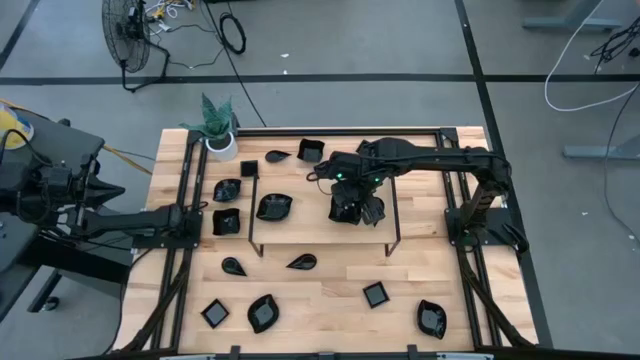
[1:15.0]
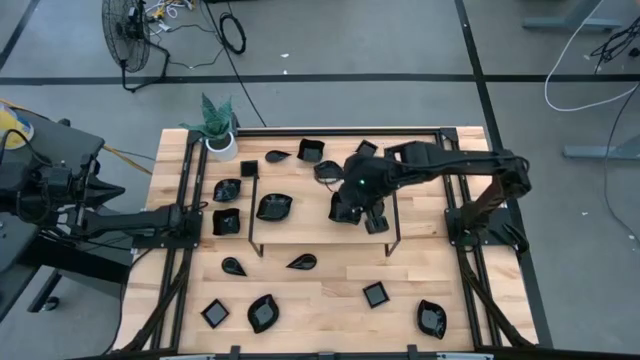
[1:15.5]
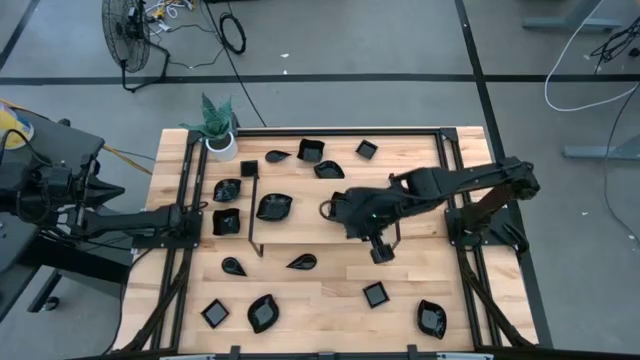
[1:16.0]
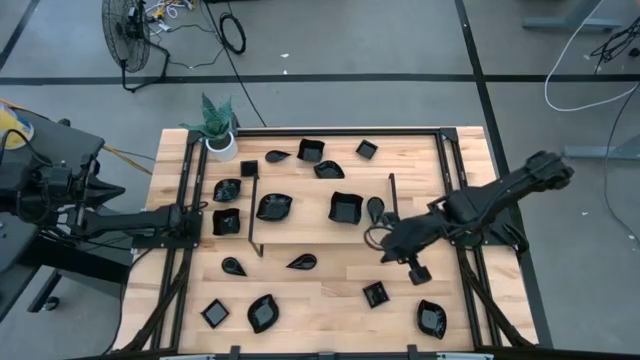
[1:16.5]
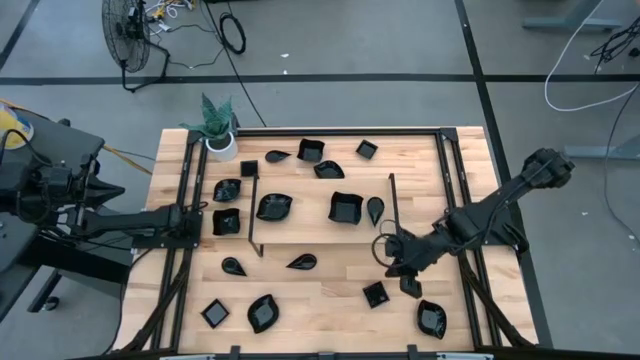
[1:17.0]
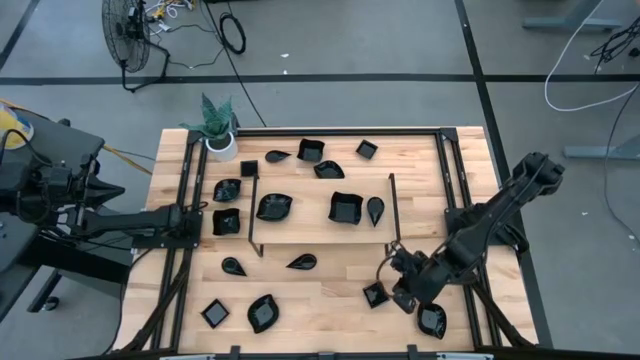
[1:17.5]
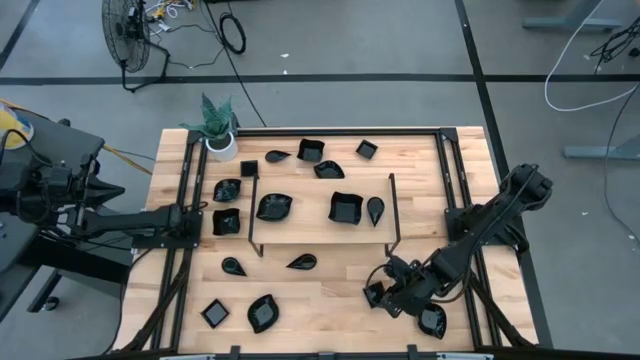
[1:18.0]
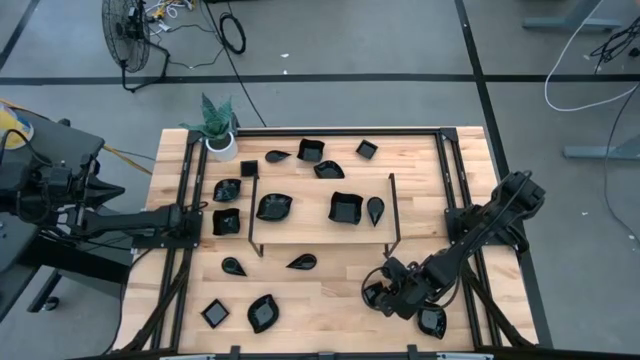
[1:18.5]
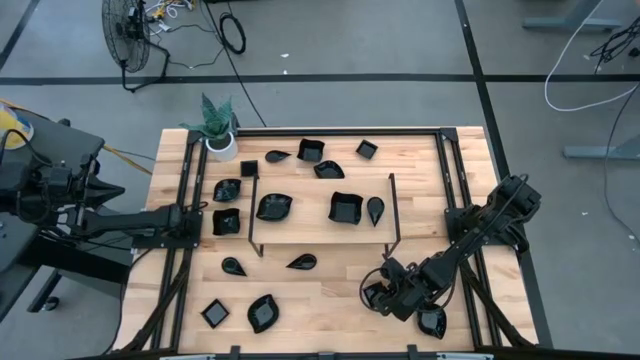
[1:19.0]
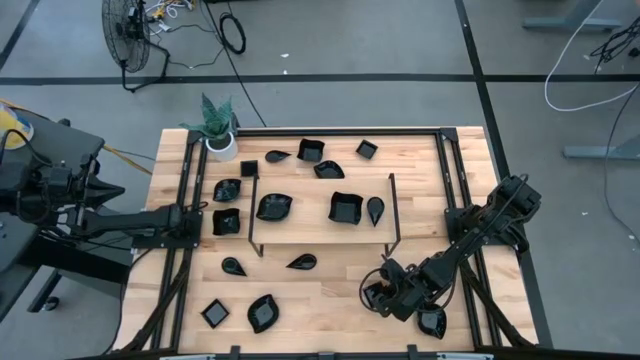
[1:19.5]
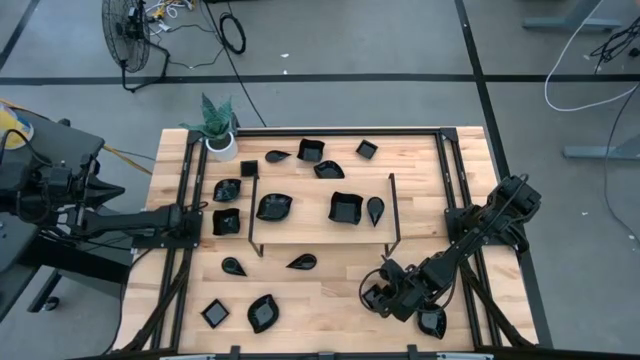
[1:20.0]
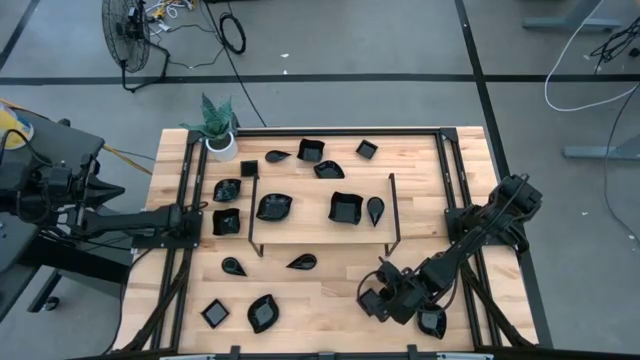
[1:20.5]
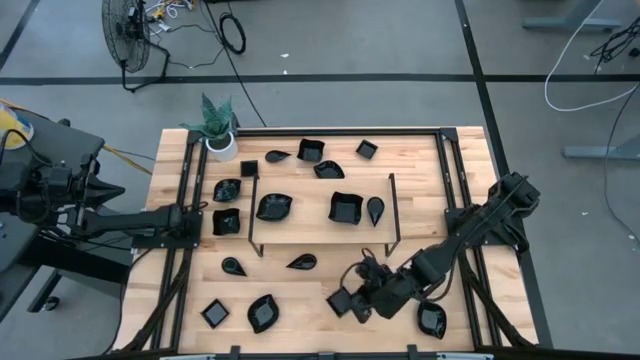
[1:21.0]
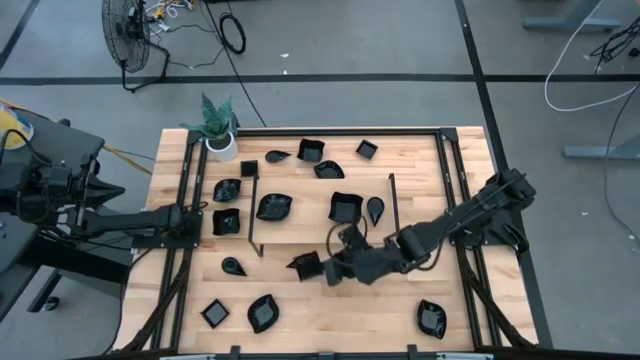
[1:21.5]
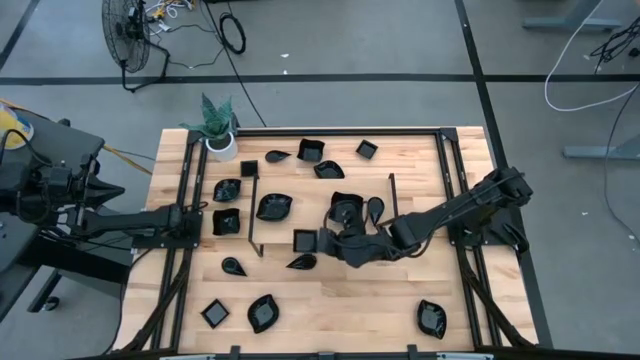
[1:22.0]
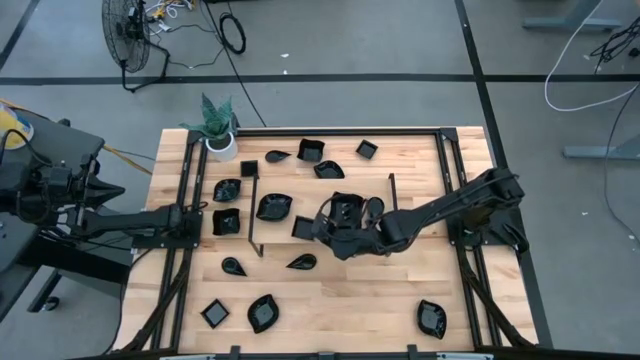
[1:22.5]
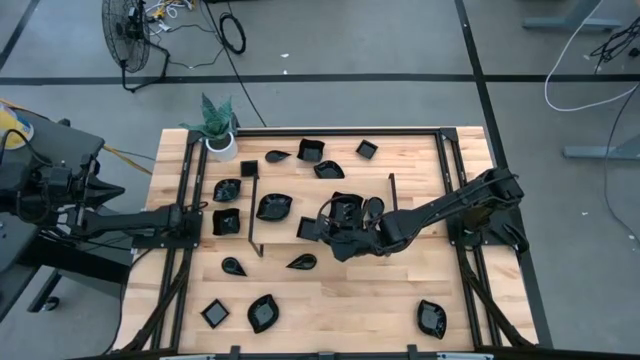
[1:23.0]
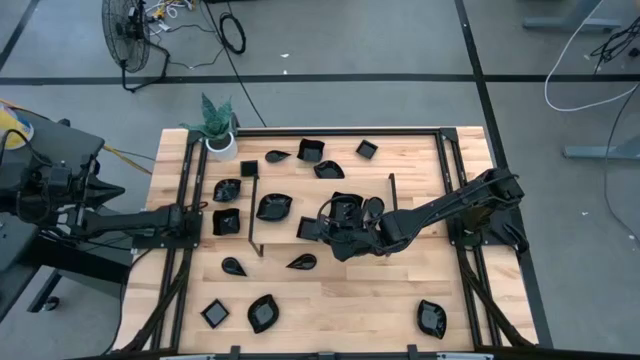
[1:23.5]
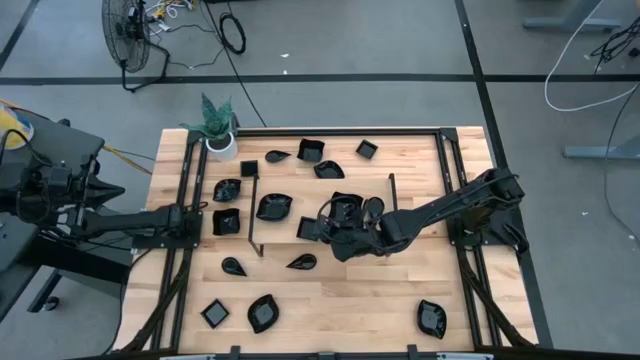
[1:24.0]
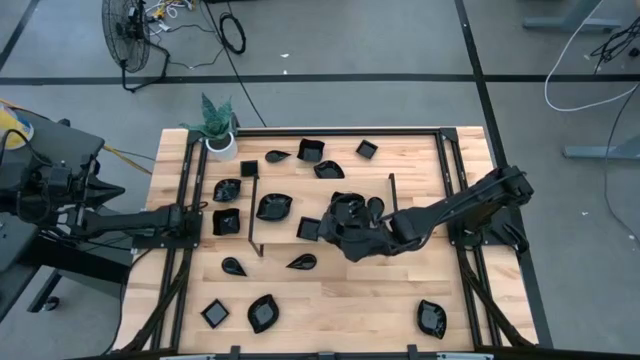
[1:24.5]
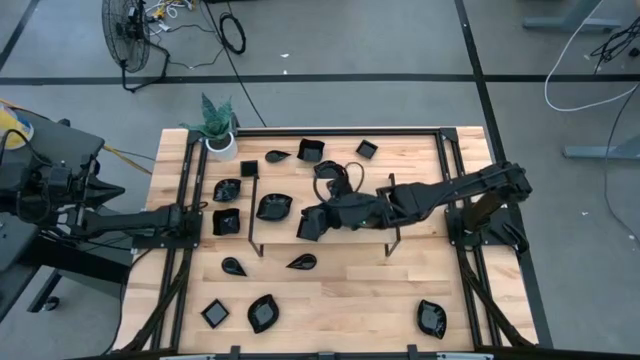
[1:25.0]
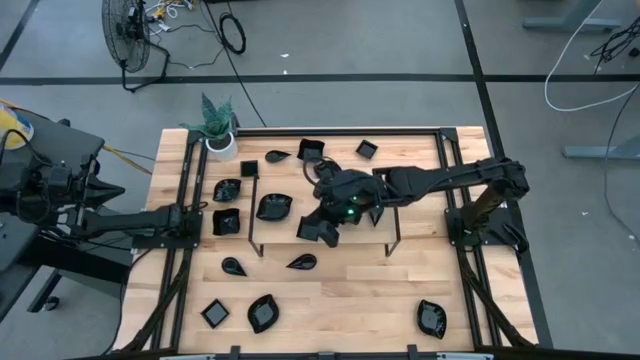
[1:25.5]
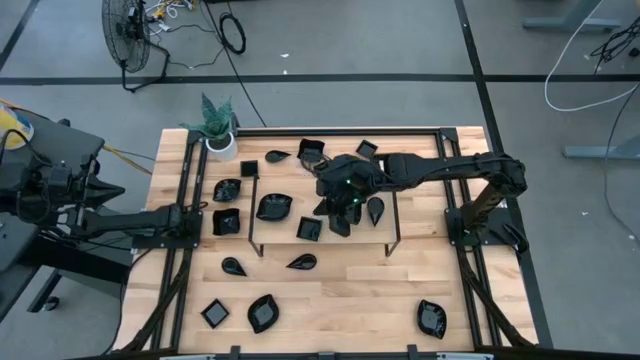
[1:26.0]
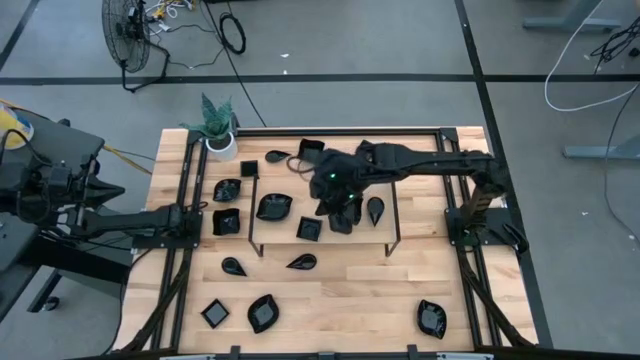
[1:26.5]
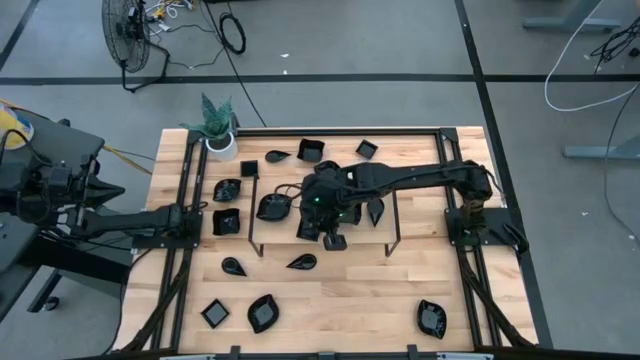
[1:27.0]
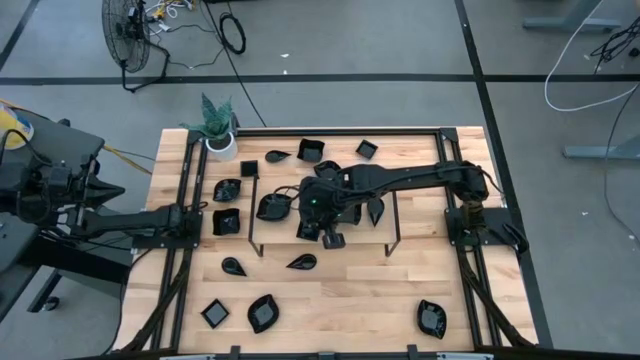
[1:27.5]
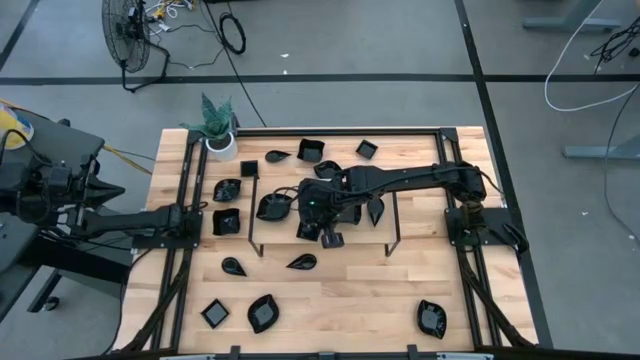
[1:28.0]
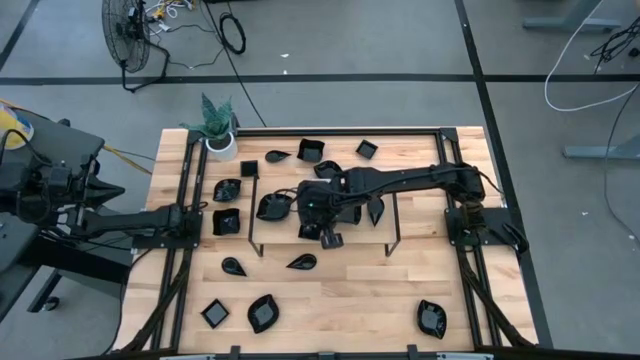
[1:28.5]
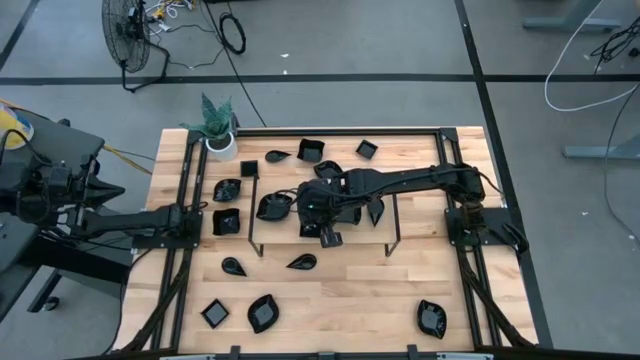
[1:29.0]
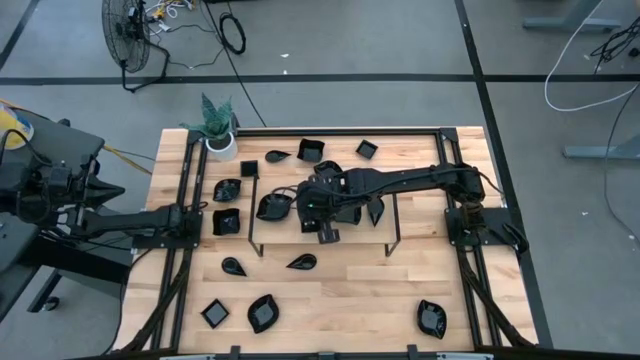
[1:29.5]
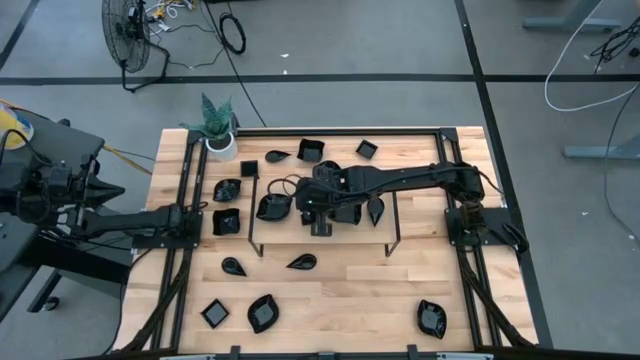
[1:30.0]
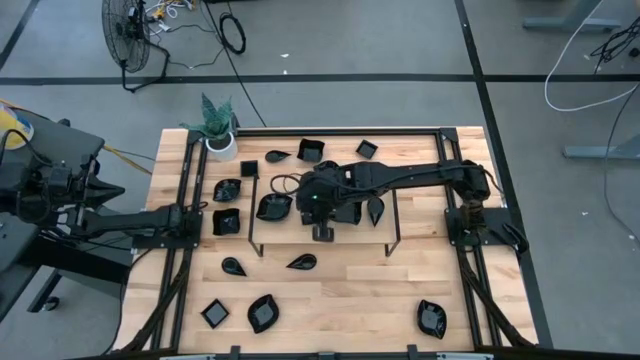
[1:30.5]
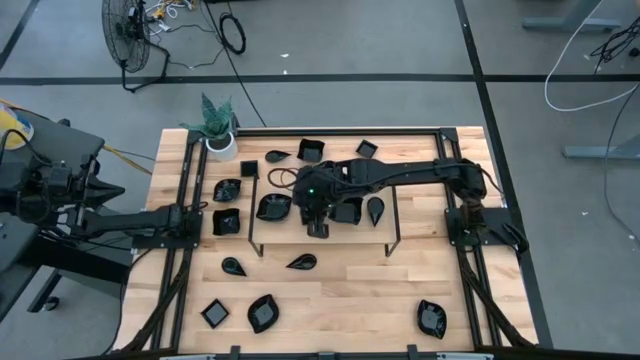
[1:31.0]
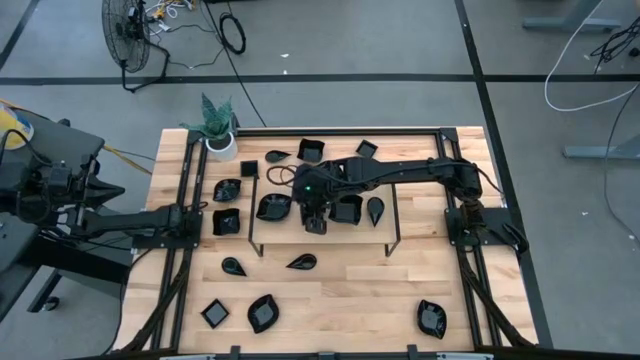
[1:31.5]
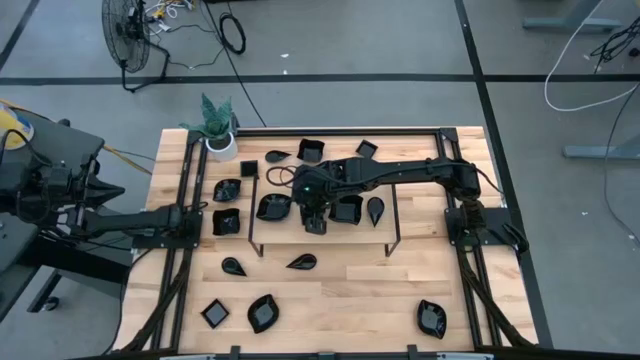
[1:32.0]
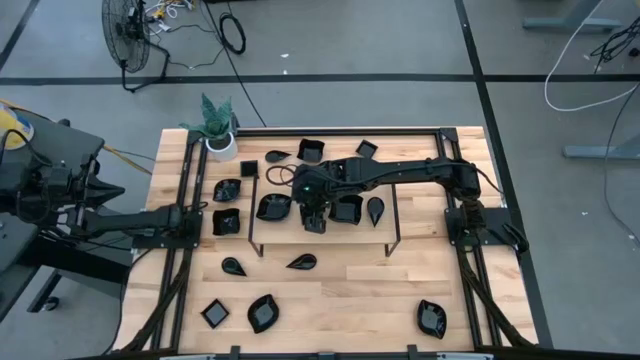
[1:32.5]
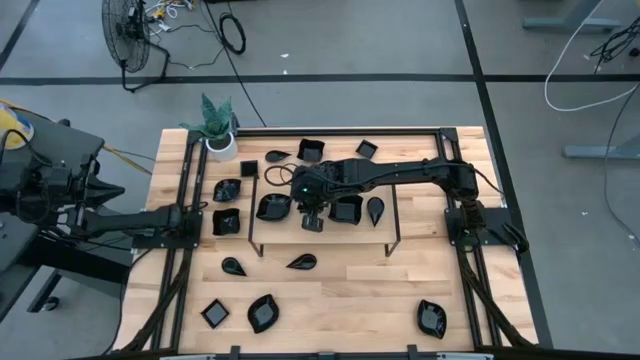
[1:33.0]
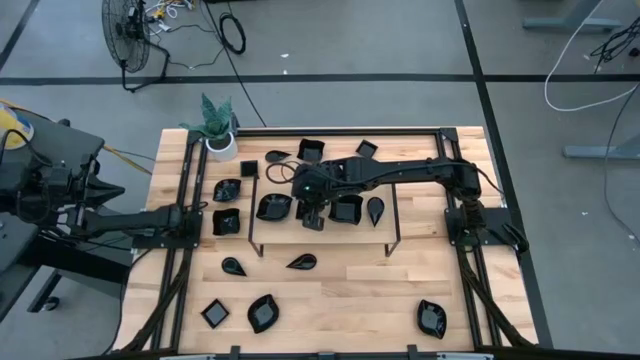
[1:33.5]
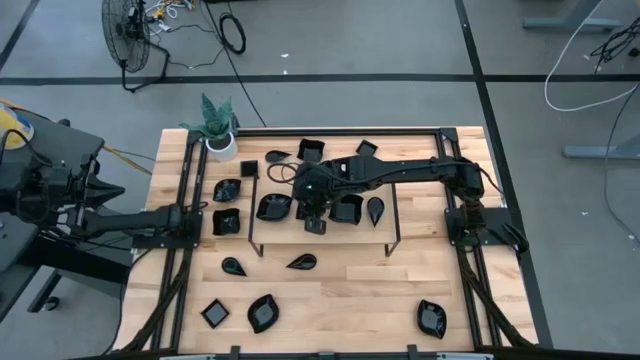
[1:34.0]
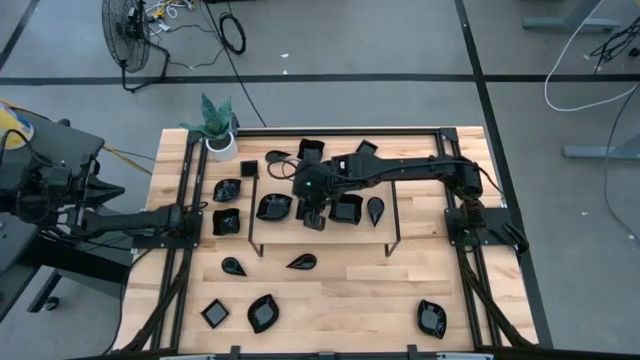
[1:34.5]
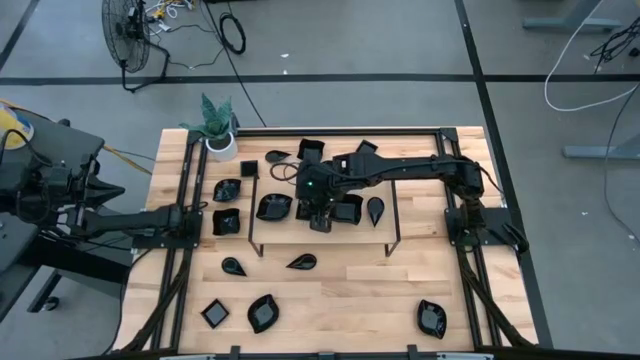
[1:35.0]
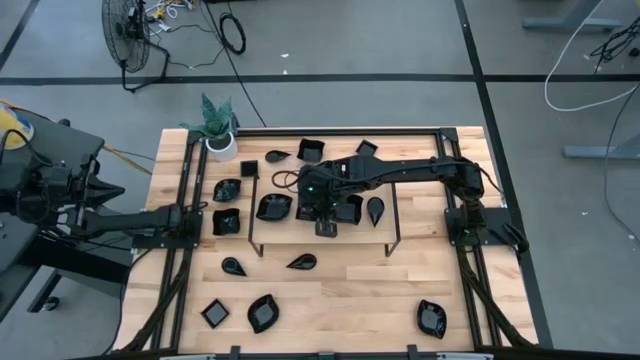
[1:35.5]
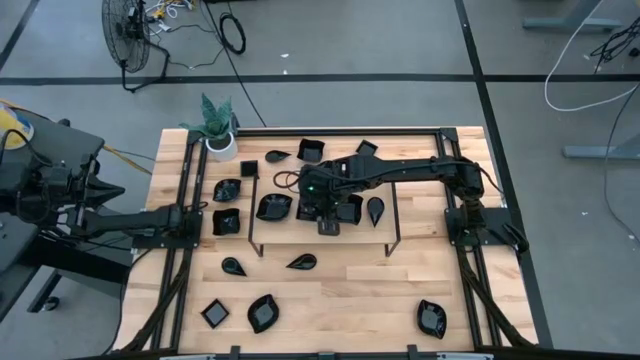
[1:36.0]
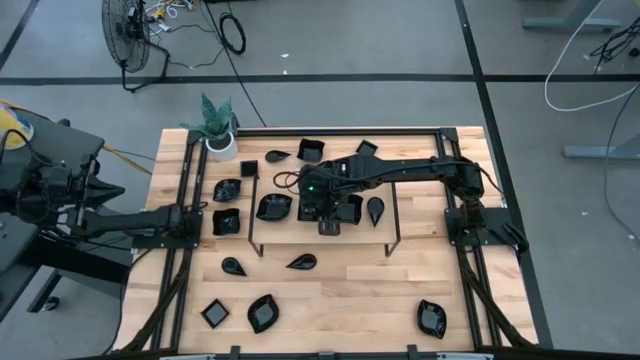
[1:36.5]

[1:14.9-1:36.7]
Task: Pick & Place Mini shaped plates
Put the square plate on the shelf
